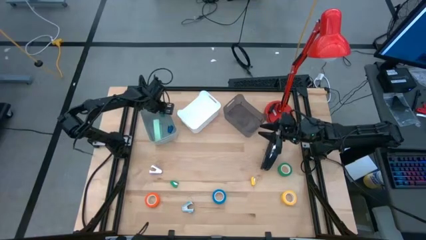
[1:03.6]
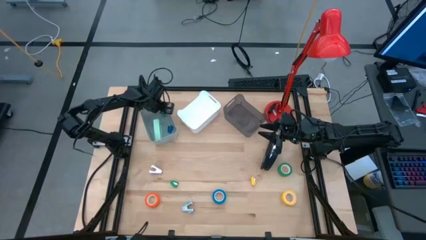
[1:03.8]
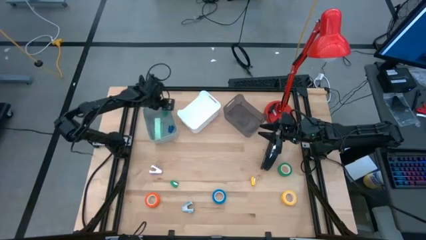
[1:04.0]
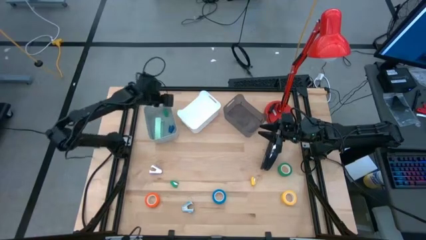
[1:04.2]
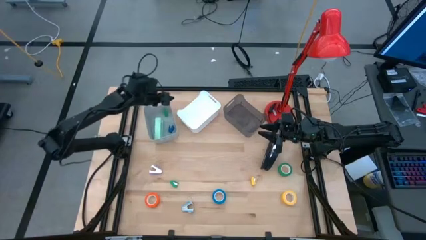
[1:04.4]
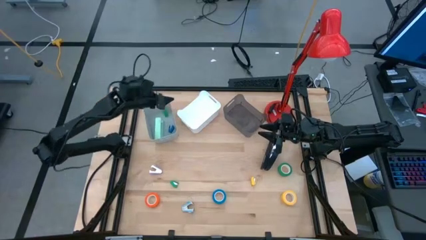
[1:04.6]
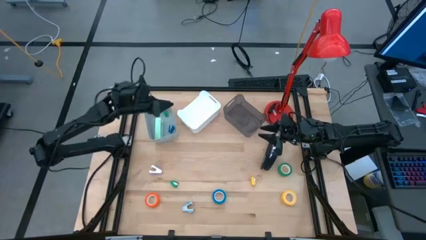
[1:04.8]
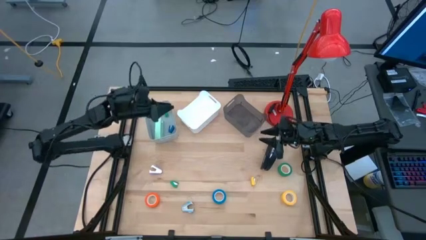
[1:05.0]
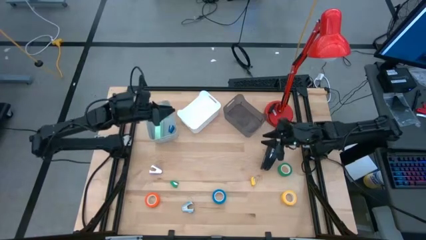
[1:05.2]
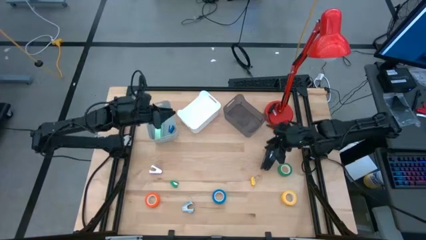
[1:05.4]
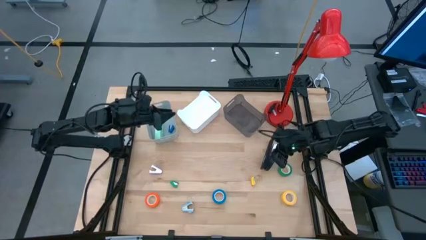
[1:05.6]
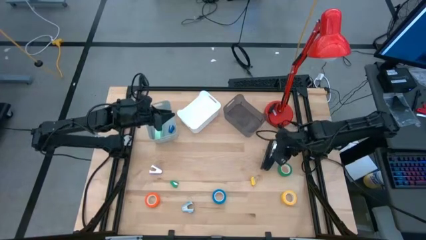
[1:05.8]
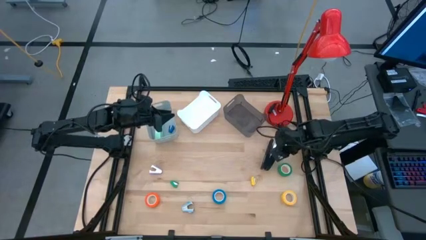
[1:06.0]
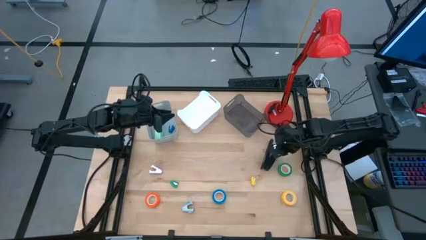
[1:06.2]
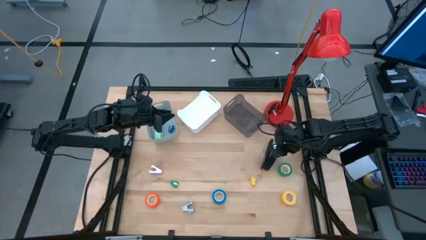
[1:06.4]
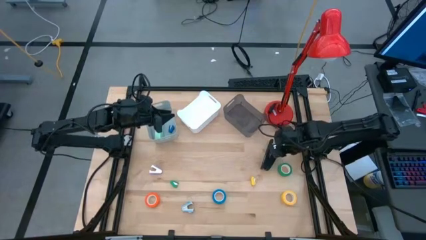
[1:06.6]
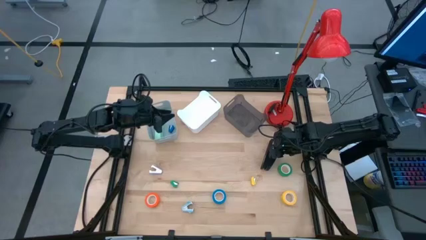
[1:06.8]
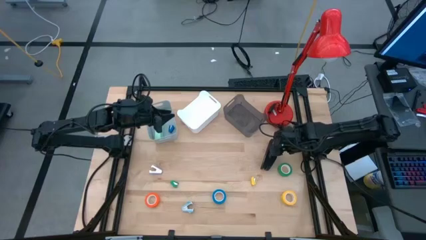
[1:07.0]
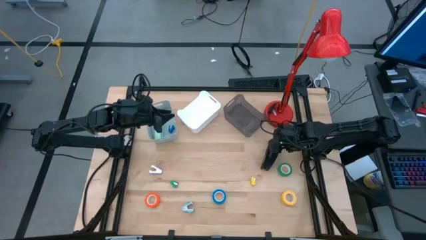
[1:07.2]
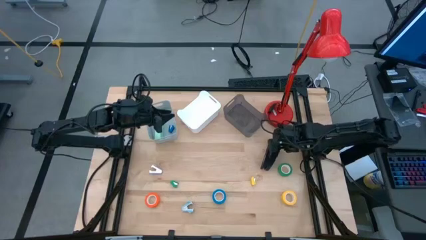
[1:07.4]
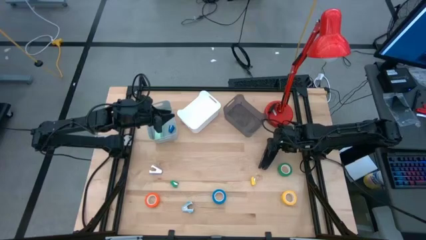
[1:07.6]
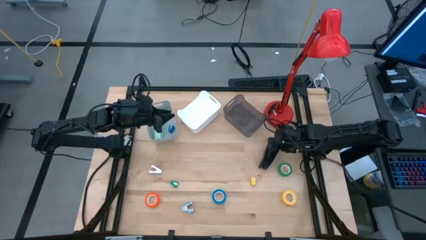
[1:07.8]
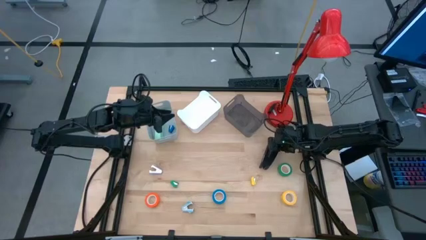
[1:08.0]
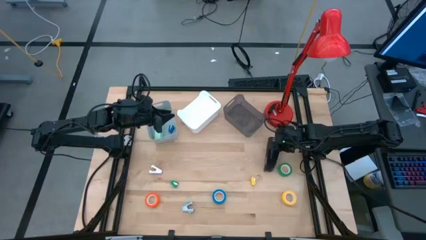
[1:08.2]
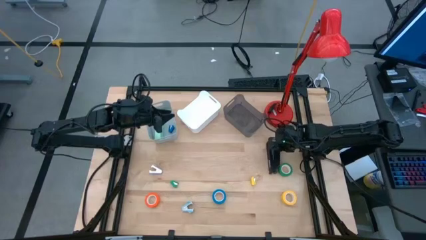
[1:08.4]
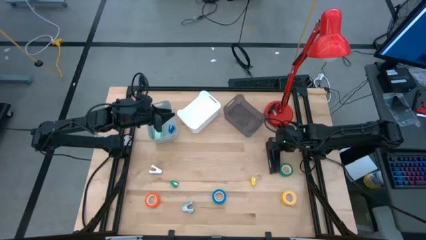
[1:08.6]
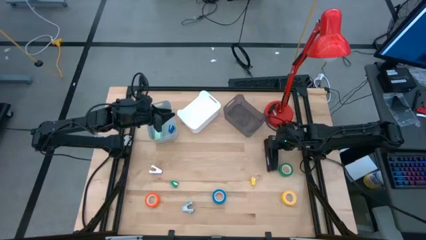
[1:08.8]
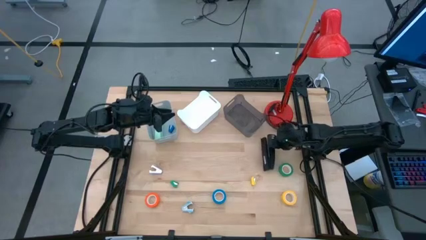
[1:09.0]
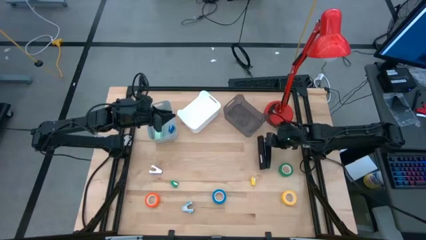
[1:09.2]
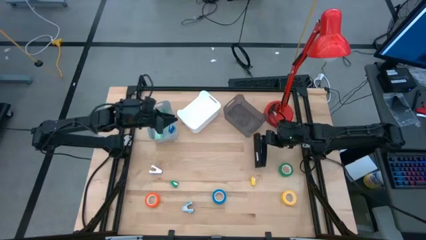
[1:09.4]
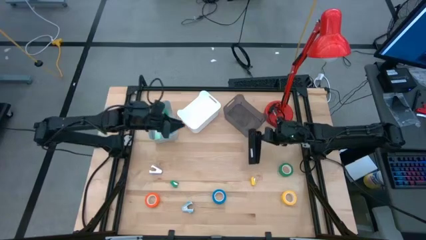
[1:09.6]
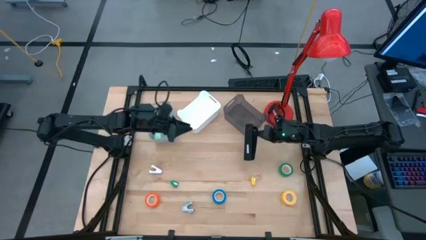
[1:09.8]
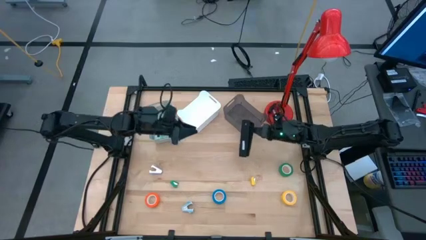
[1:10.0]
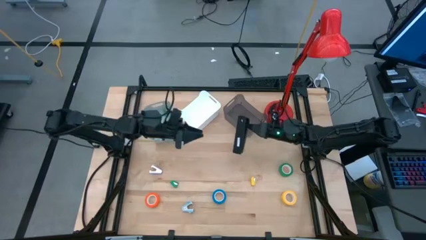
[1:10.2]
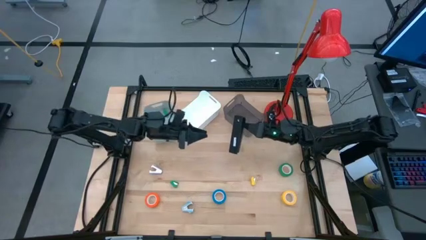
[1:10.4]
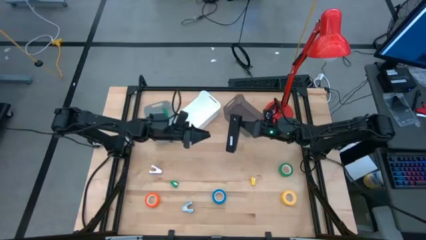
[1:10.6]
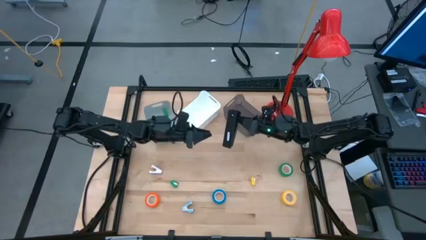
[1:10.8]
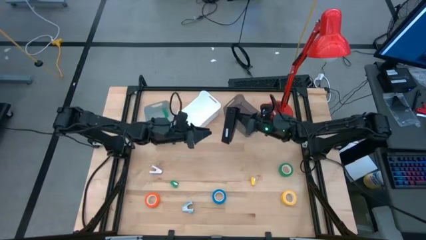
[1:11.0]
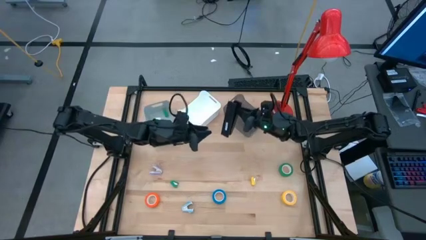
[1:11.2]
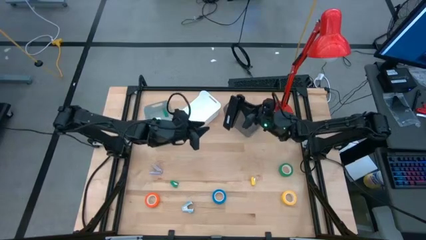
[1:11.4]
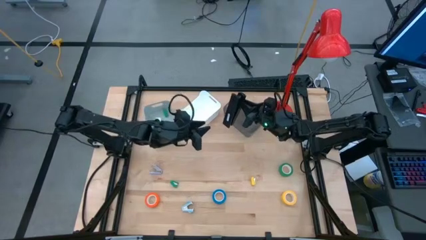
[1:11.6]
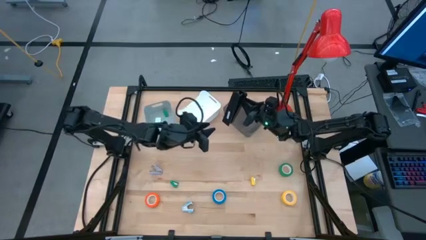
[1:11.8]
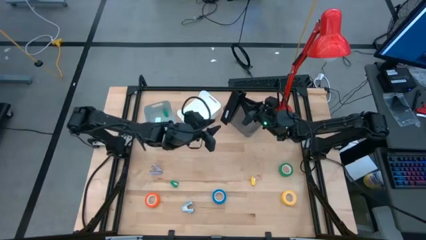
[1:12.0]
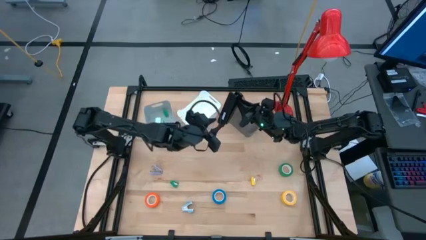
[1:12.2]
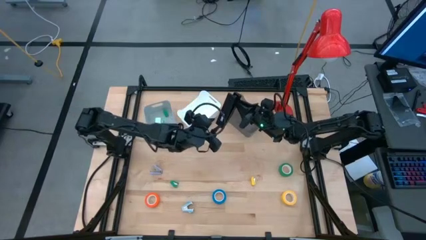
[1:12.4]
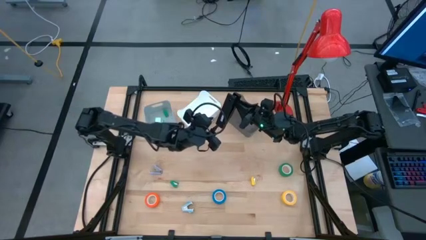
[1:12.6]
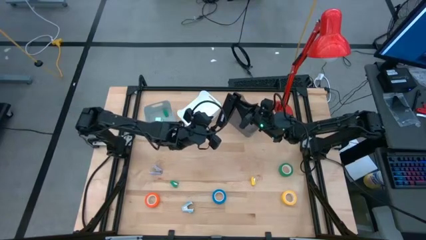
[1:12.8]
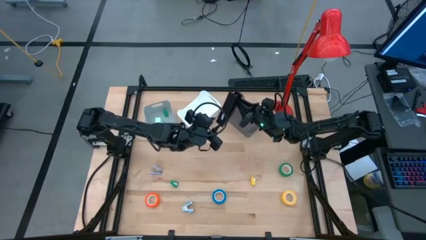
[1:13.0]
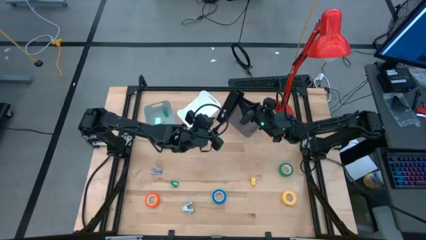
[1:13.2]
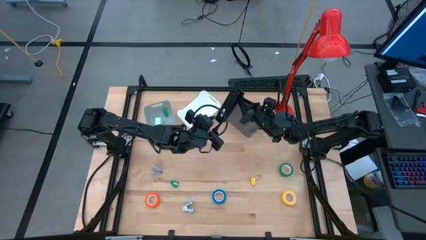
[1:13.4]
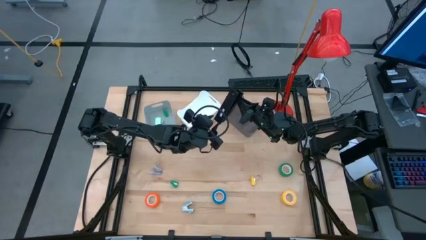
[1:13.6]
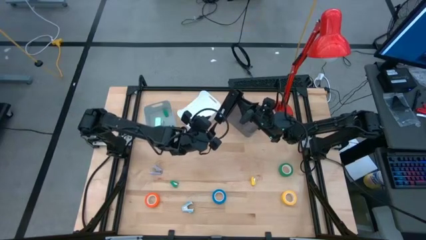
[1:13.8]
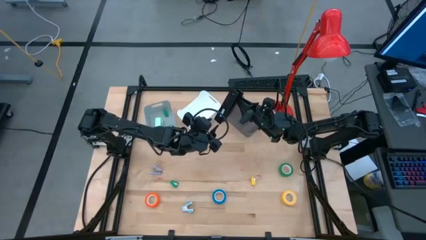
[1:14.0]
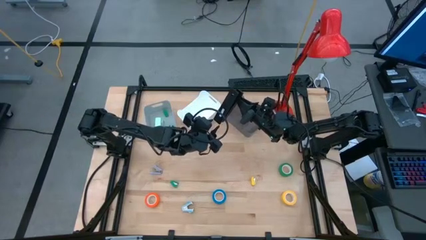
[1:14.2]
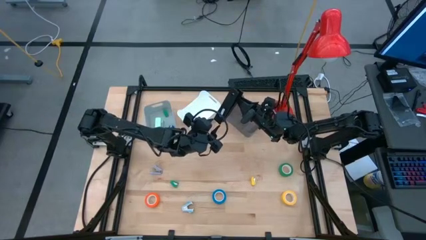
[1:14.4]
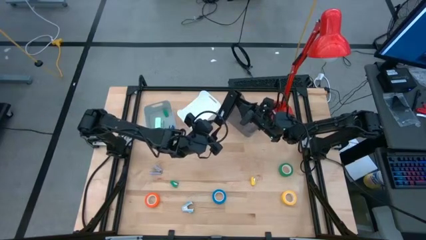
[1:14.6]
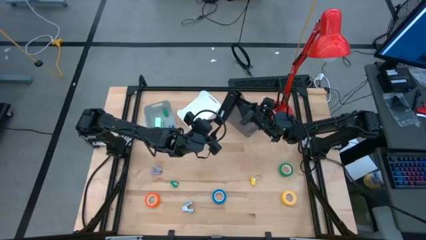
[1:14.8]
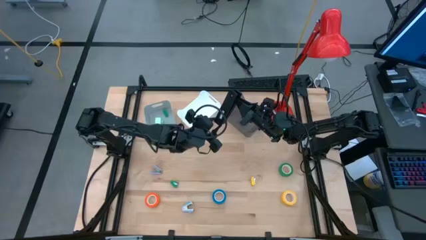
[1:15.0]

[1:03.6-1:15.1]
Task: Pick and place Stapler, Stapler remover, tape
Put the large black stapler into the gray bin
